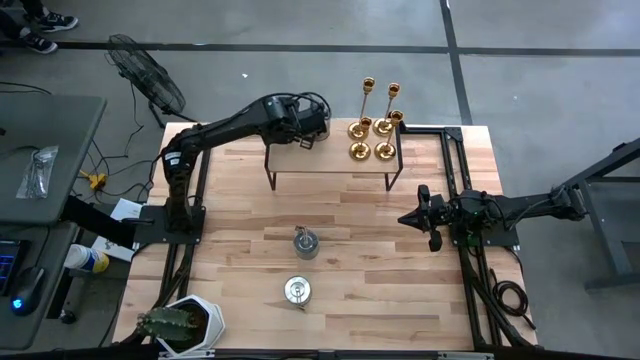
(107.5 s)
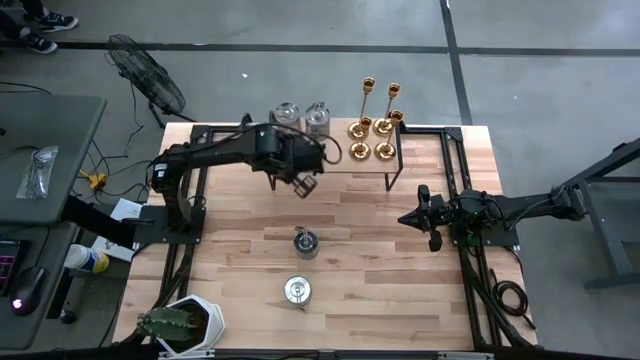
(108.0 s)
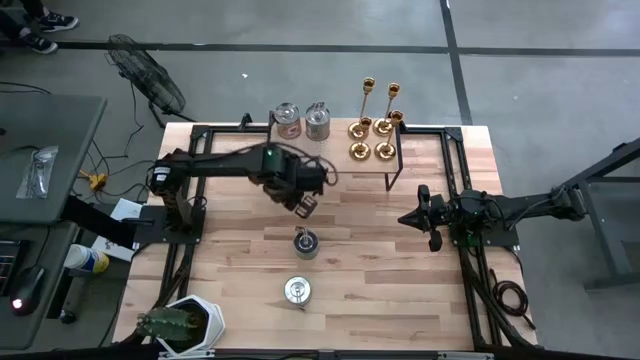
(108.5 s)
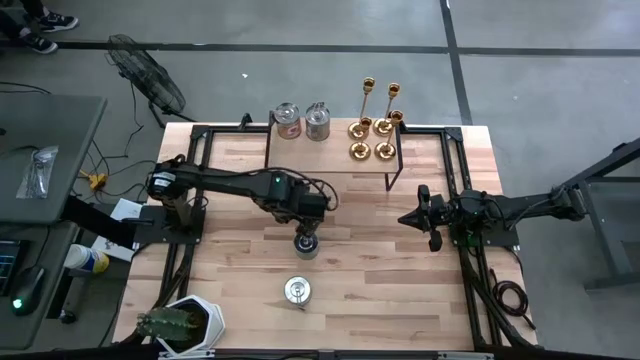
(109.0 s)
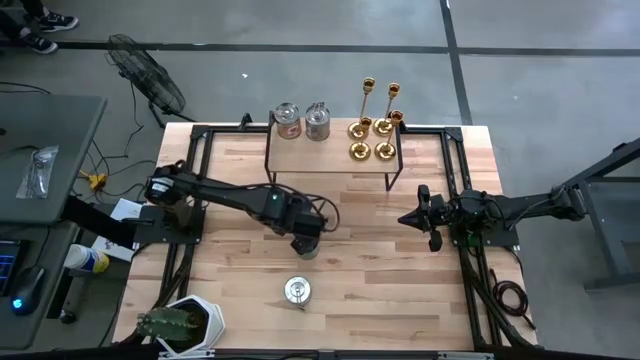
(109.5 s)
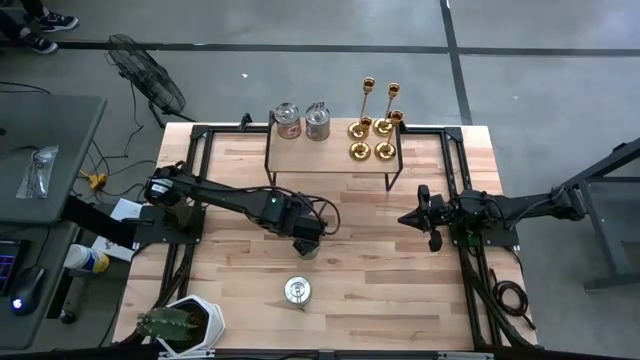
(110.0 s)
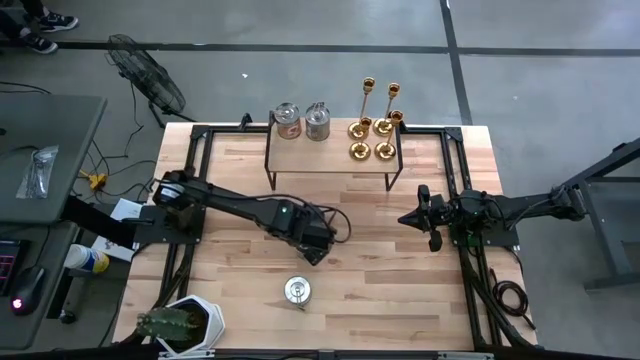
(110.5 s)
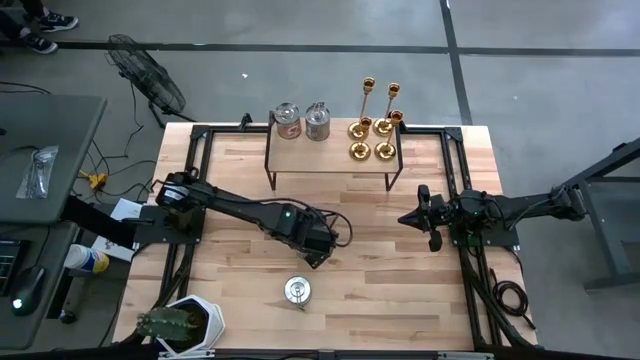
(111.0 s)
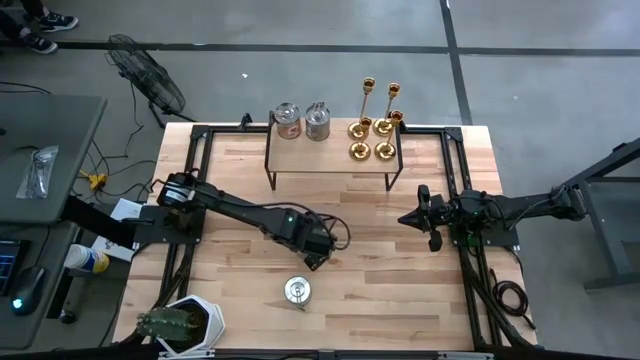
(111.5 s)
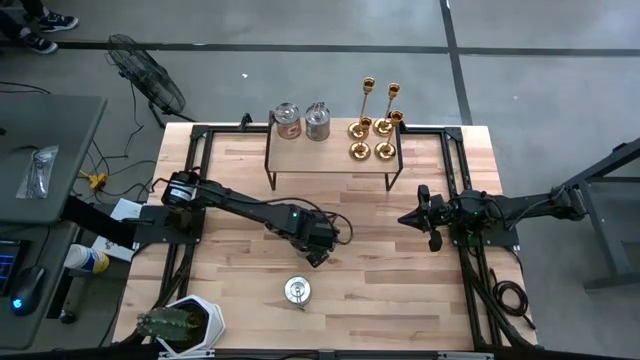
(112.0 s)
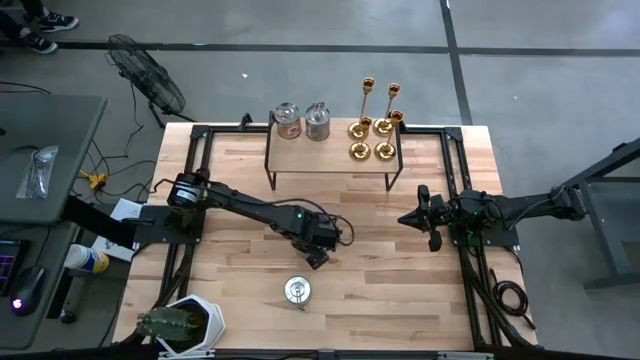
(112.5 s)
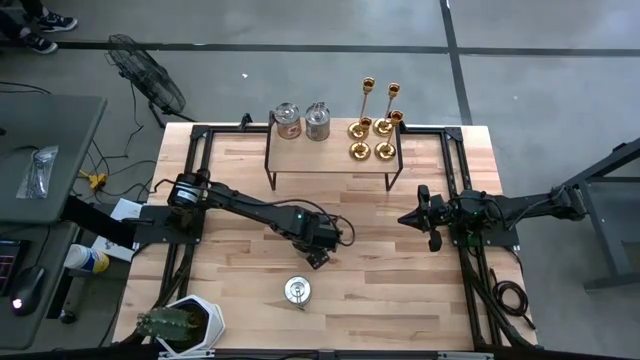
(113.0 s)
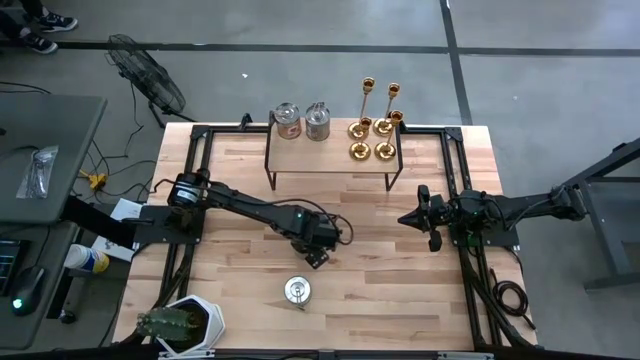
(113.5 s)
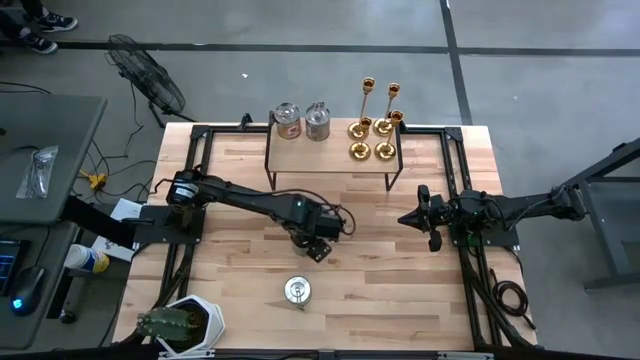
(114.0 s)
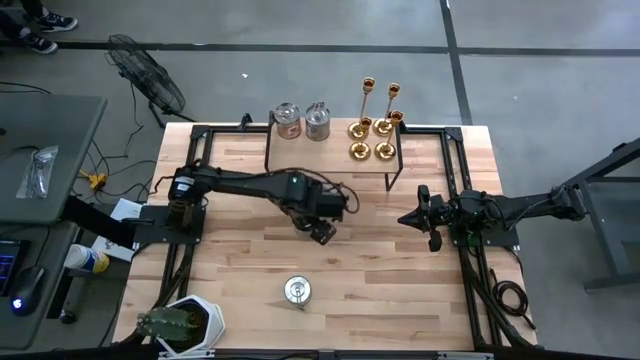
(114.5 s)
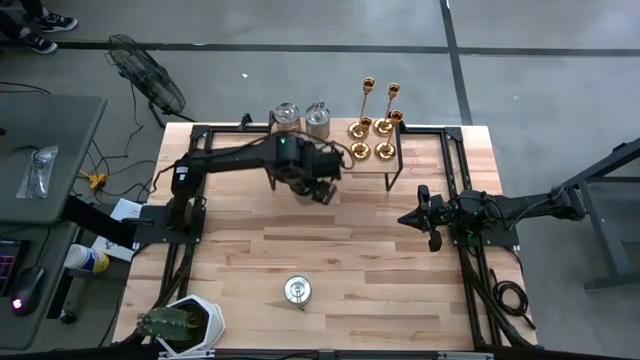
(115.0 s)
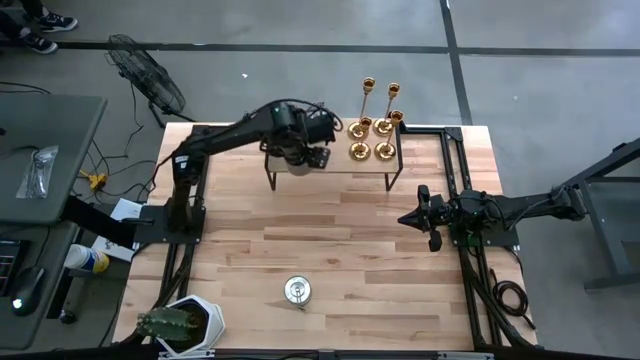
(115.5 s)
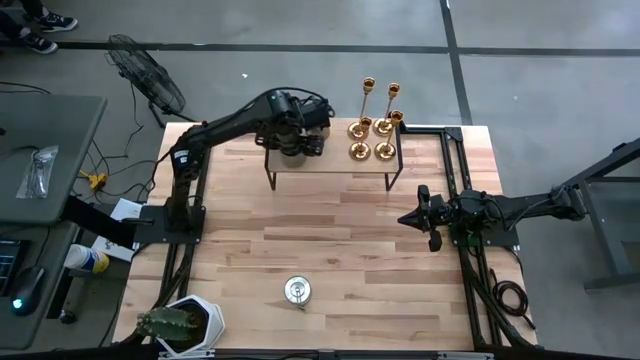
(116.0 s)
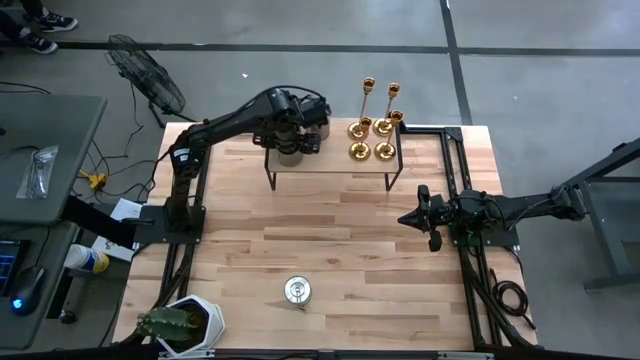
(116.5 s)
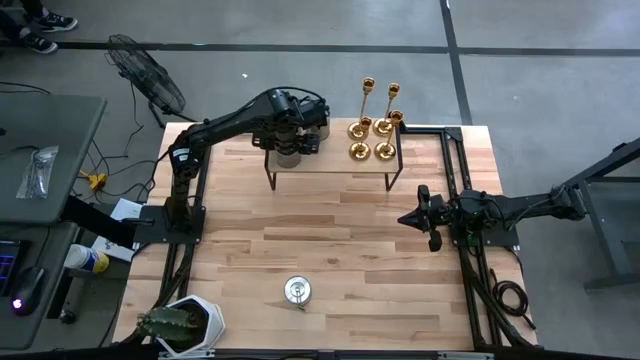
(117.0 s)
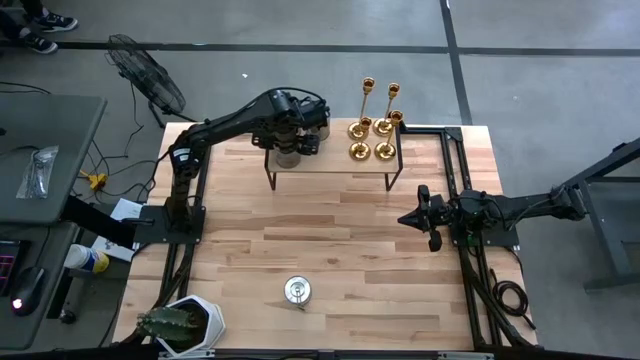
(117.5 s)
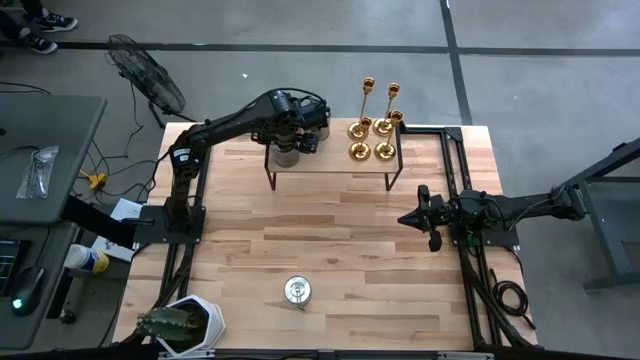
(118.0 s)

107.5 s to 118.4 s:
Task: Pick & Place candle stick holders
Put the brown scented candle on the shelf aligned with the other scented candle

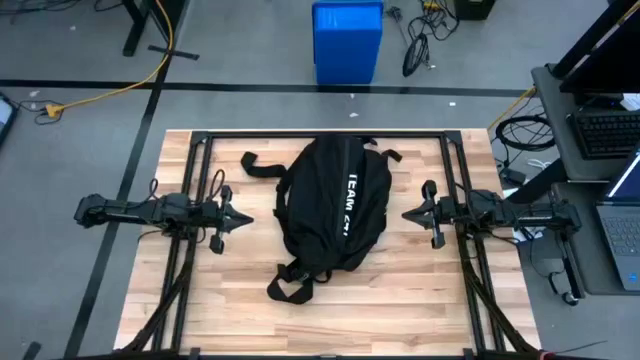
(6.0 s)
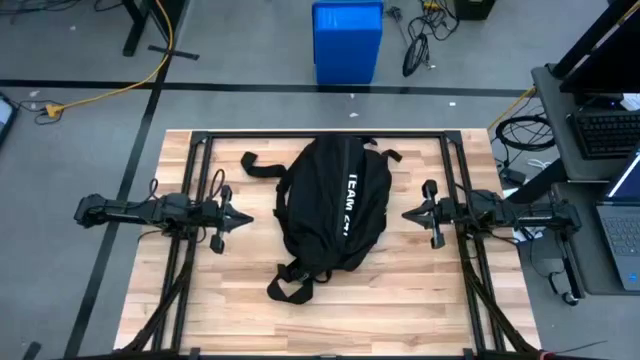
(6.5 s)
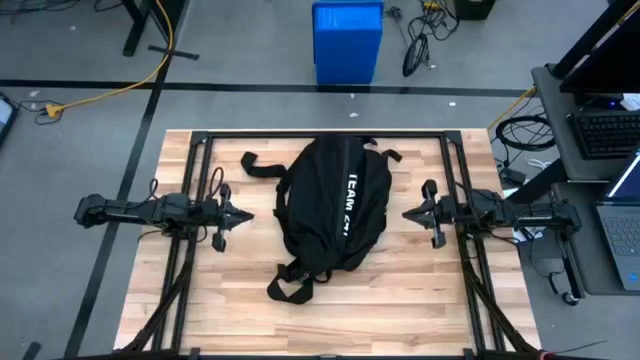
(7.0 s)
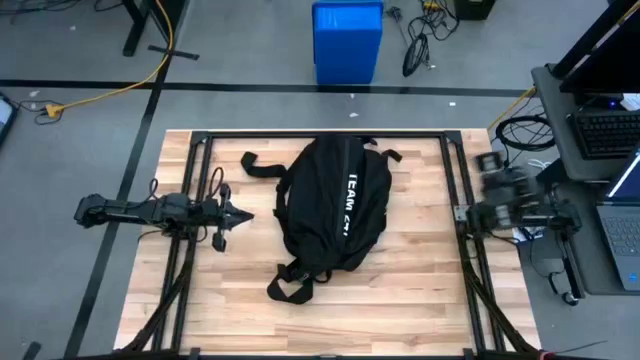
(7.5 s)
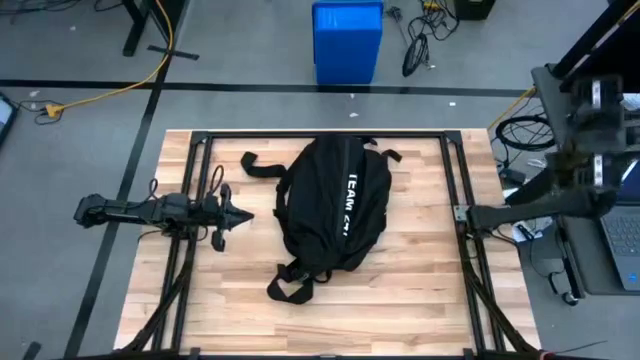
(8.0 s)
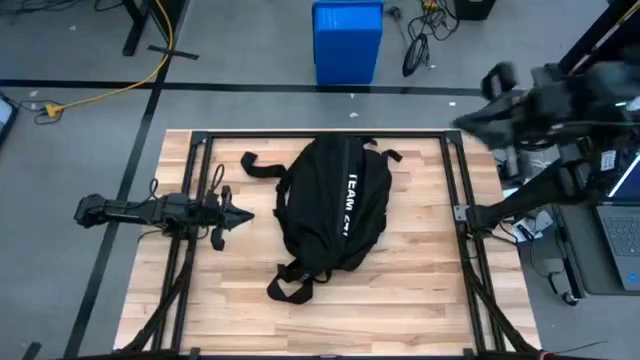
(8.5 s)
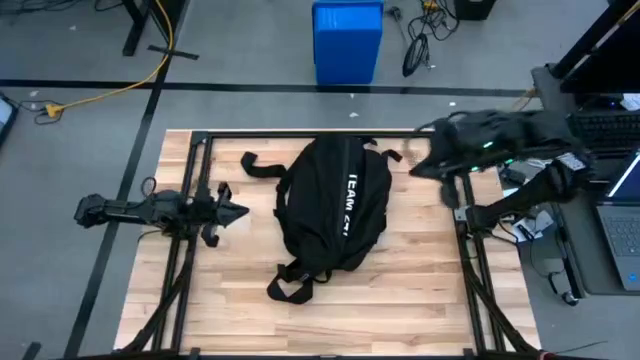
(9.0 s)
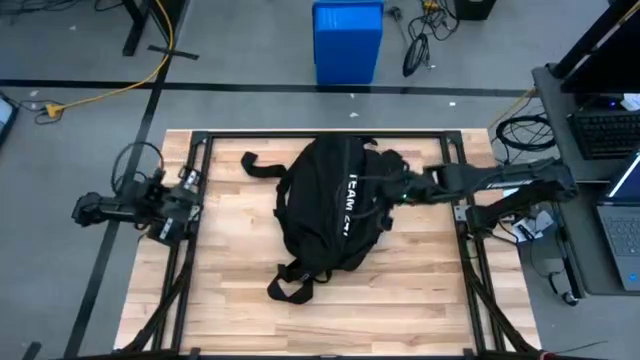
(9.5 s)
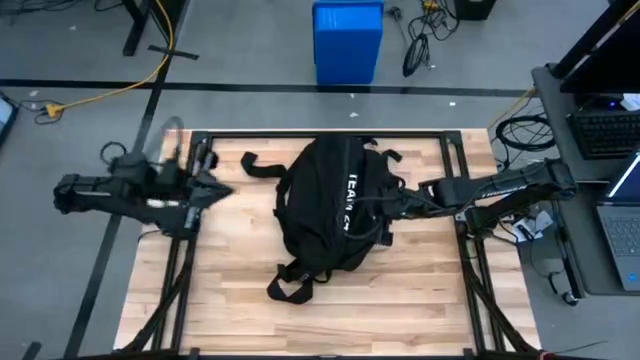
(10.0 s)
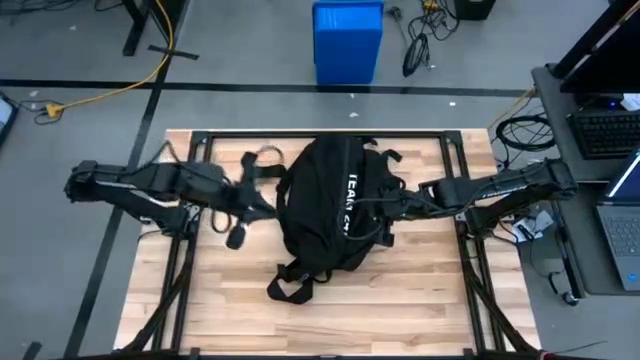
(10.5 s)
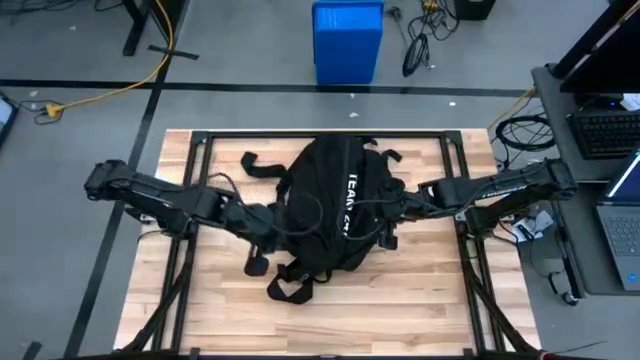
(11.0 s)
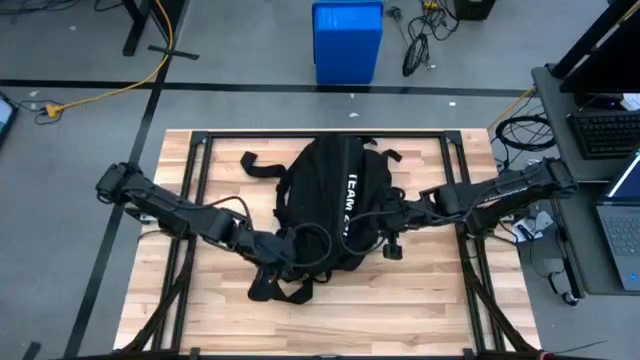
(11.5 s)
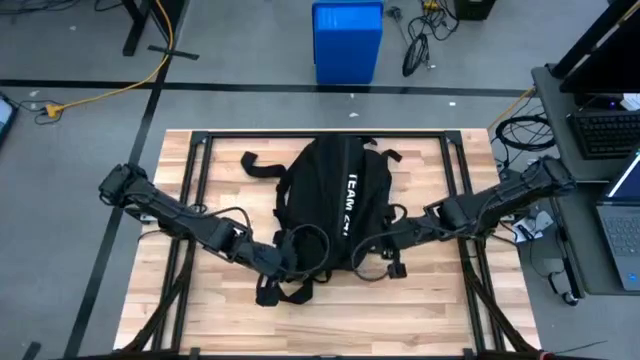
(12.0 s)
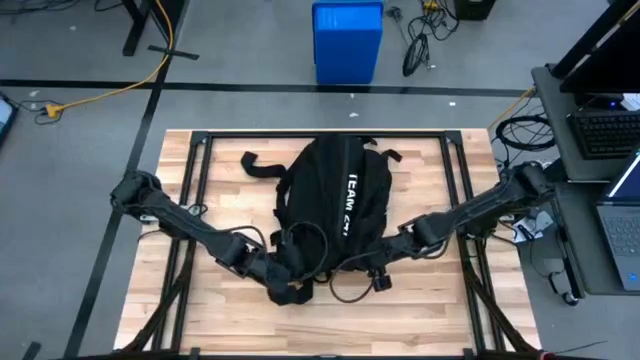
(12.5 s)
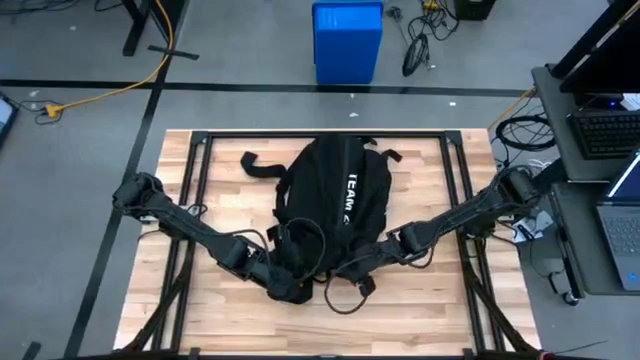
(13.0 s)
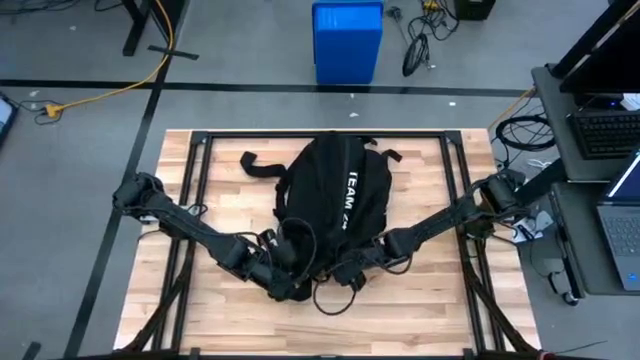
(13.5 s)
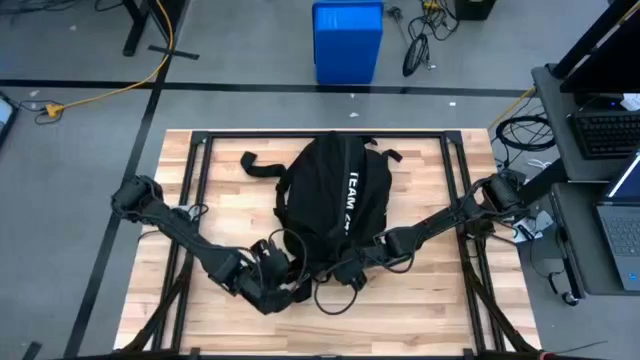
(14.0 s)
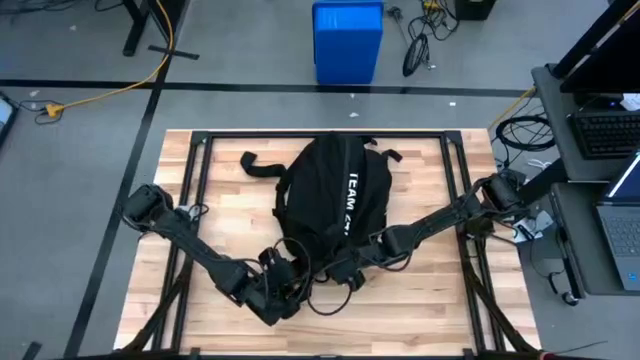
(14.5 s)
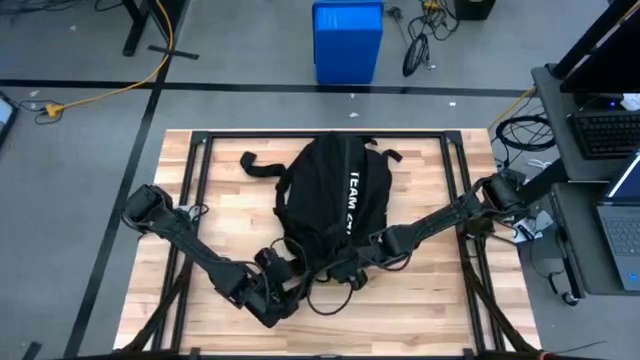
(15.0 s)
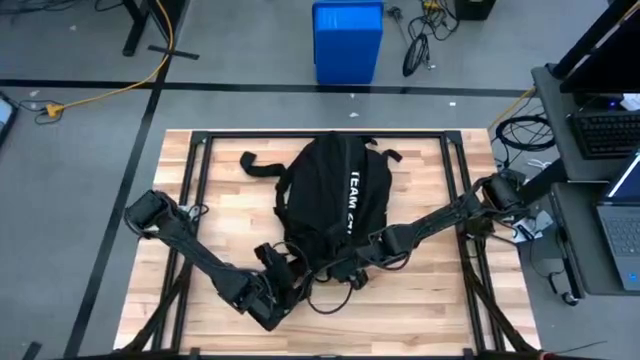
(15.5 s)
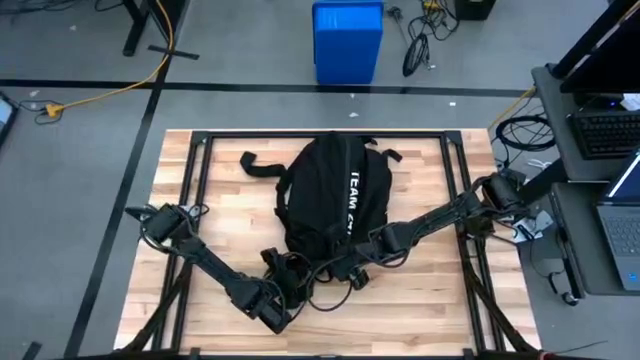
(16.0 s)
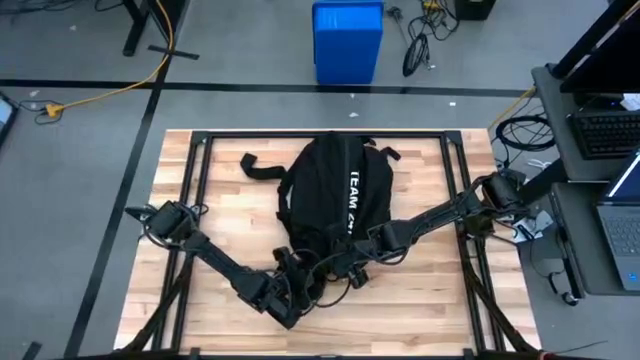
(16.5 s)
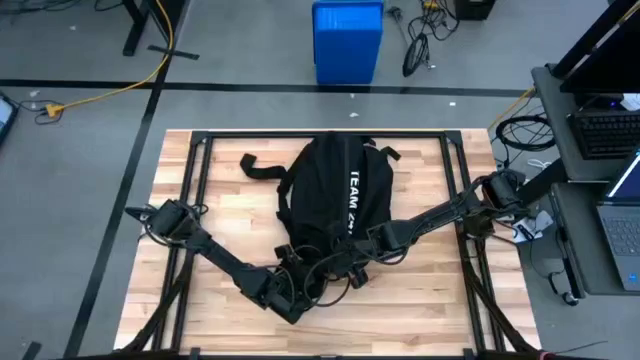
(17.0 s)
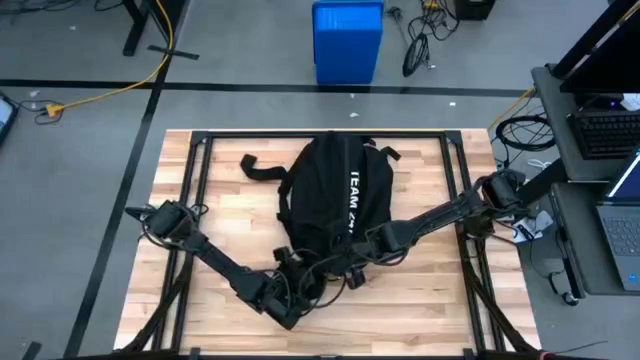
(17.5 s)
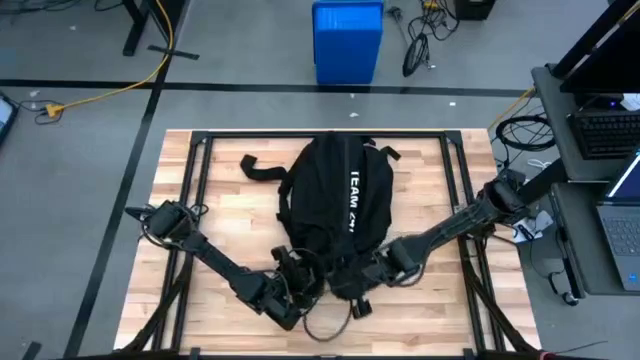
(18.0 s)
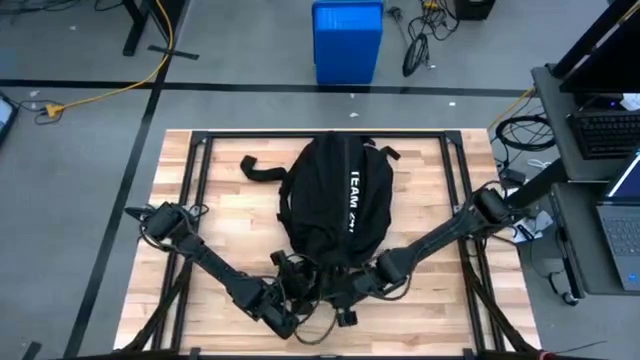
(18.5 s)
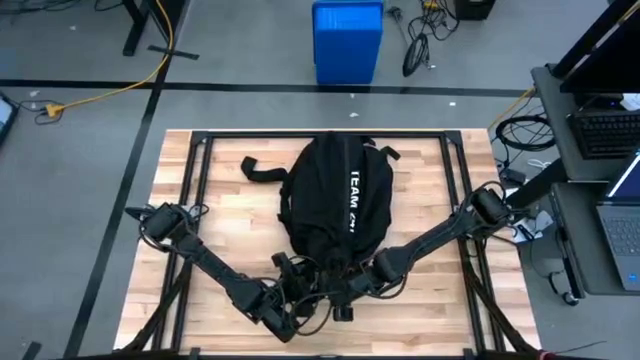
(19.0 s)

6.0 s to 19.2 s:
Task: Unpack backpack
Open the black backpack
